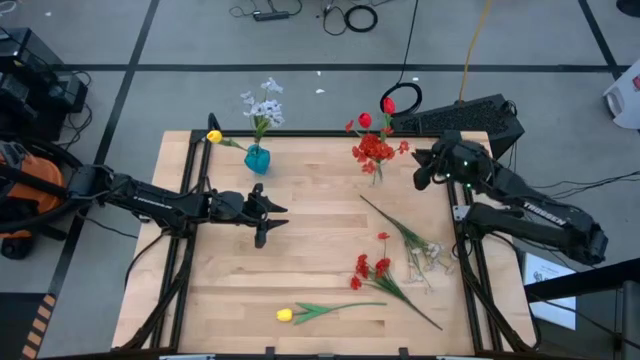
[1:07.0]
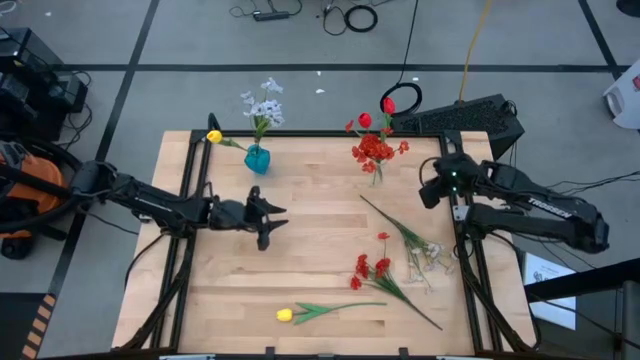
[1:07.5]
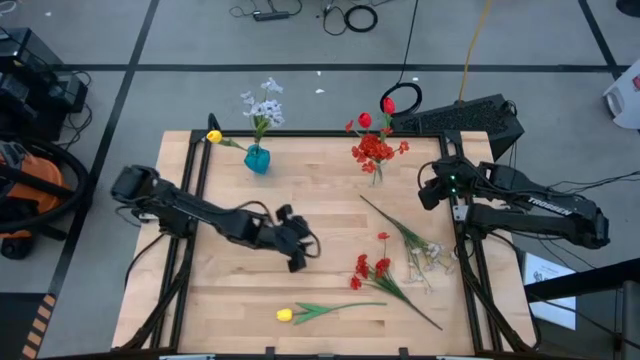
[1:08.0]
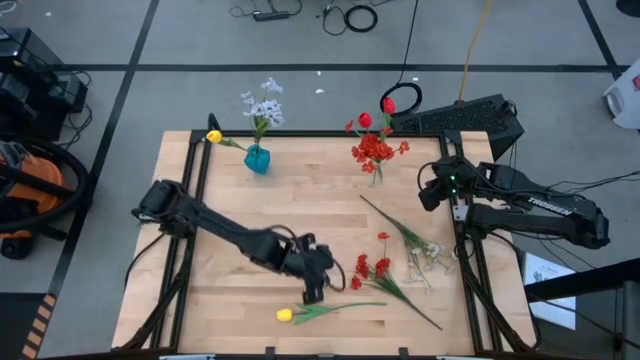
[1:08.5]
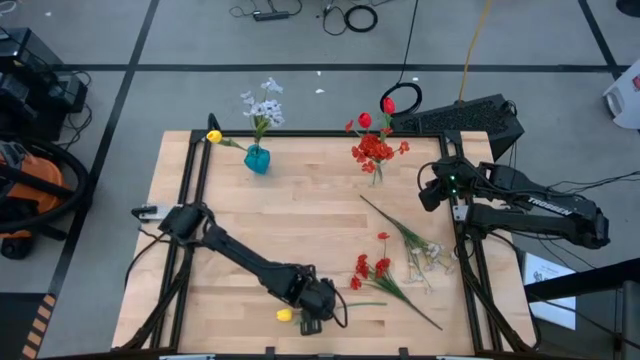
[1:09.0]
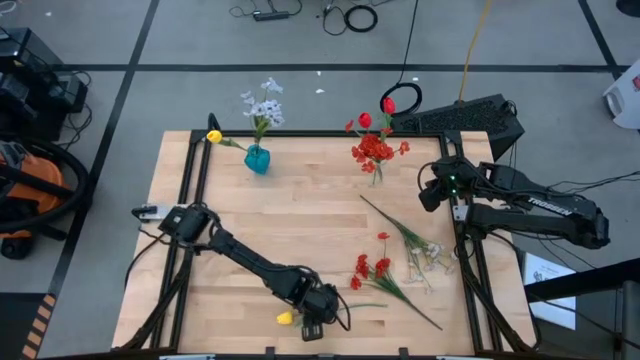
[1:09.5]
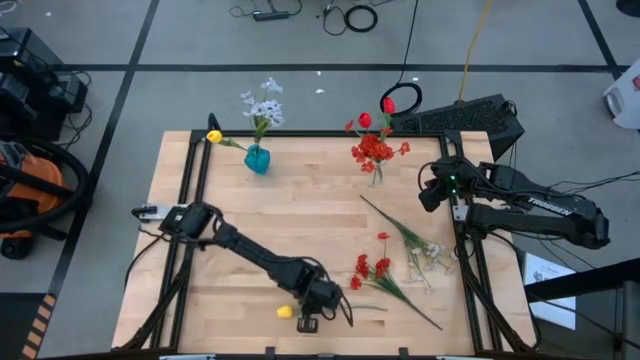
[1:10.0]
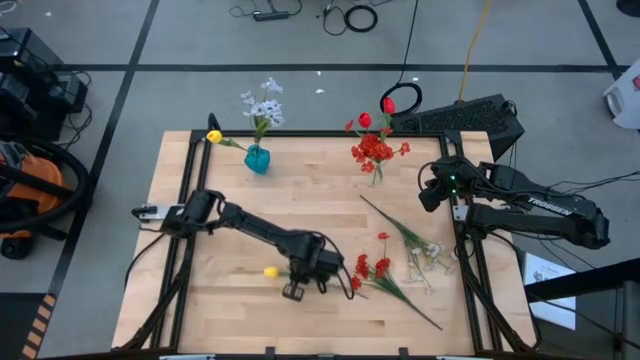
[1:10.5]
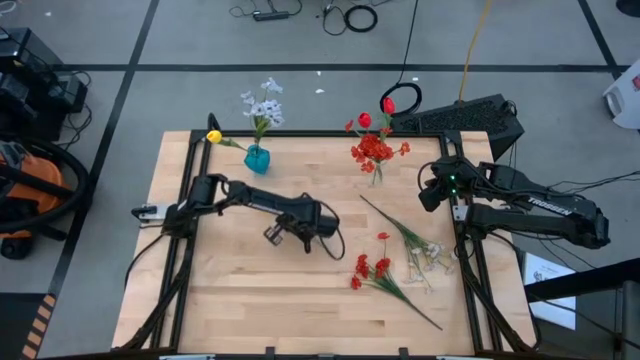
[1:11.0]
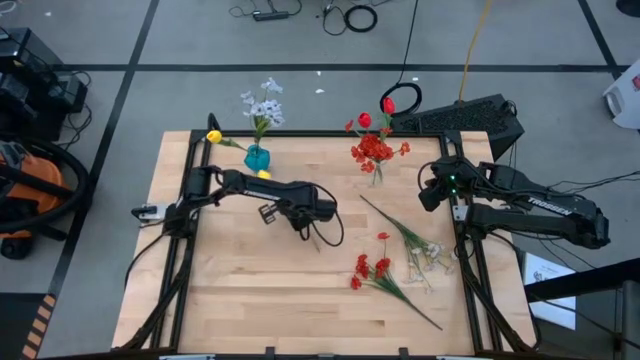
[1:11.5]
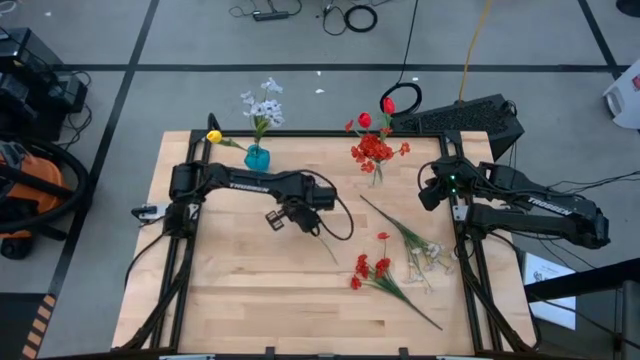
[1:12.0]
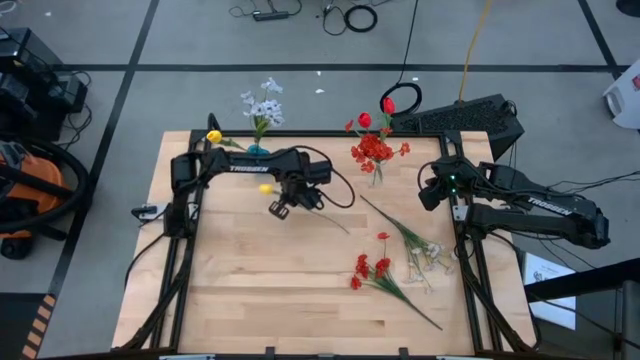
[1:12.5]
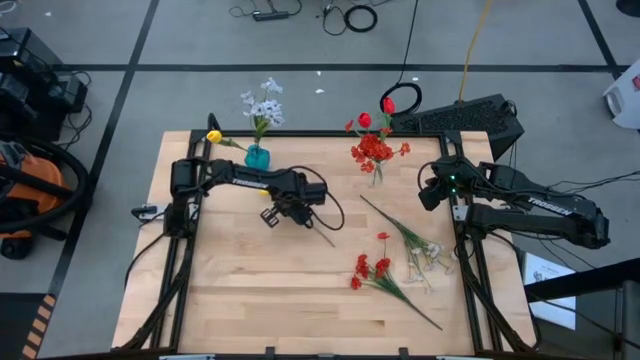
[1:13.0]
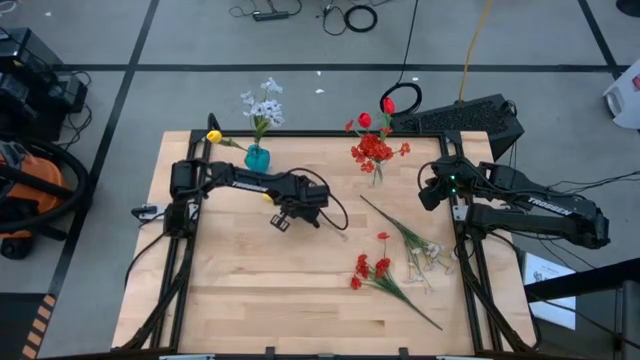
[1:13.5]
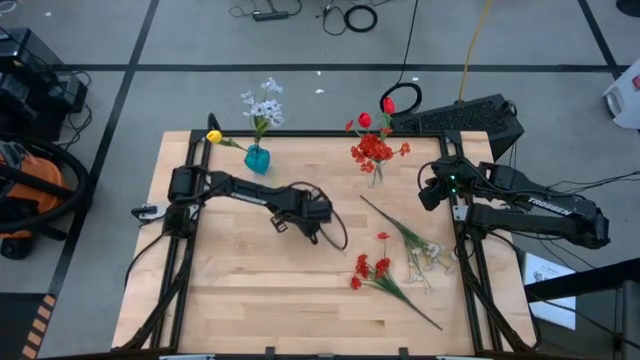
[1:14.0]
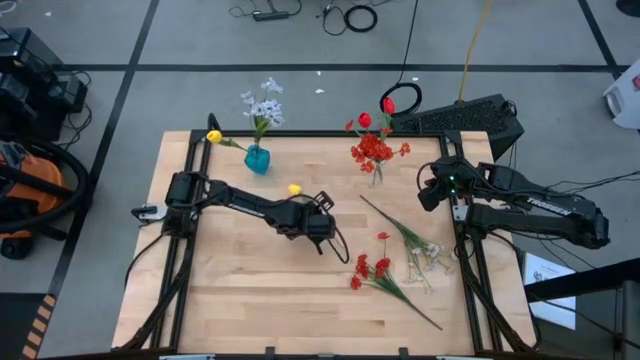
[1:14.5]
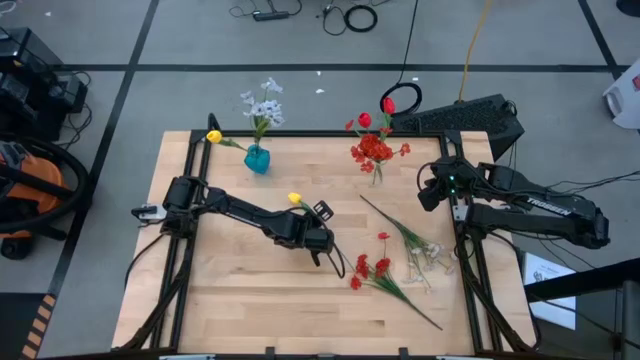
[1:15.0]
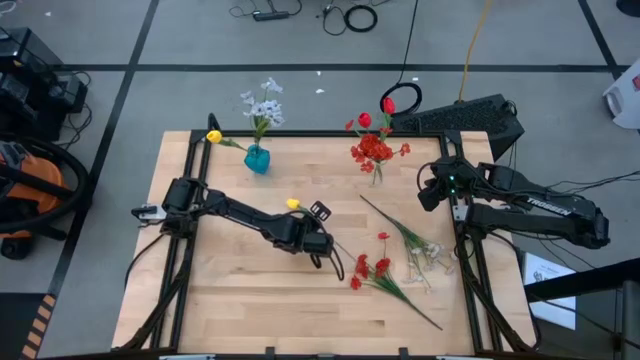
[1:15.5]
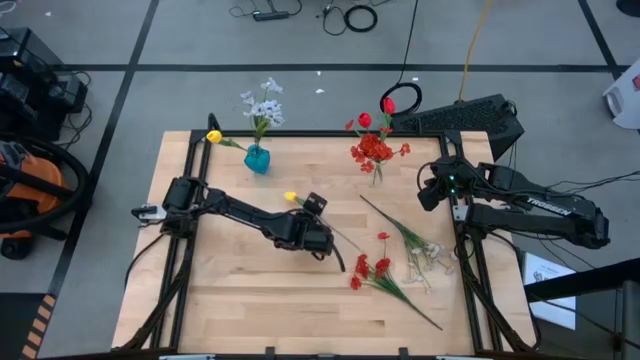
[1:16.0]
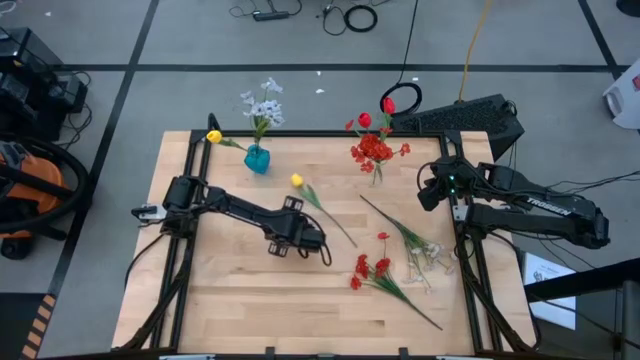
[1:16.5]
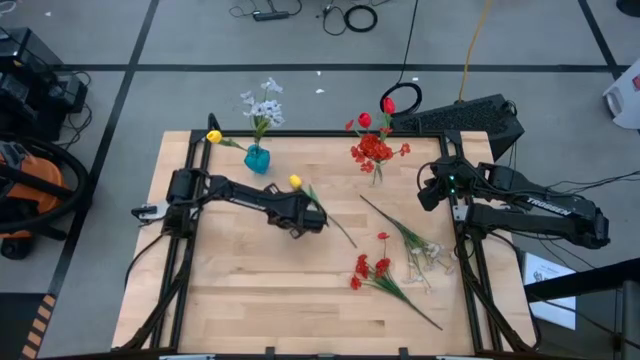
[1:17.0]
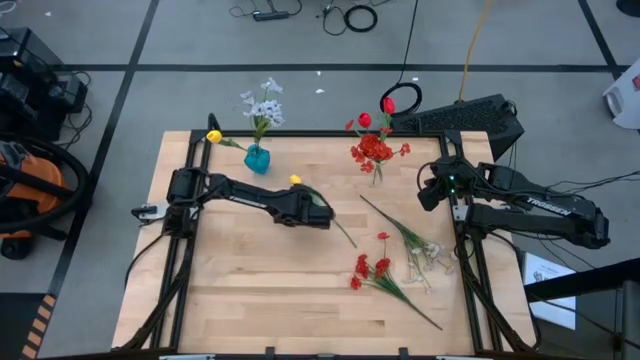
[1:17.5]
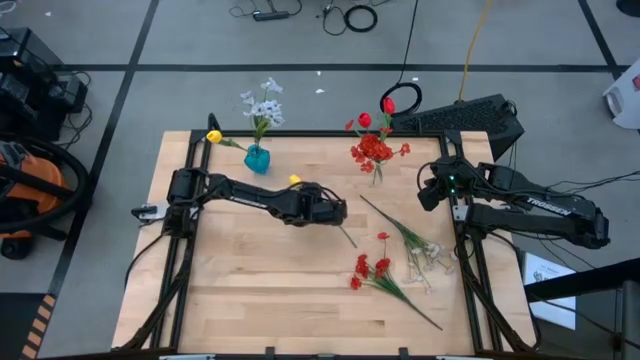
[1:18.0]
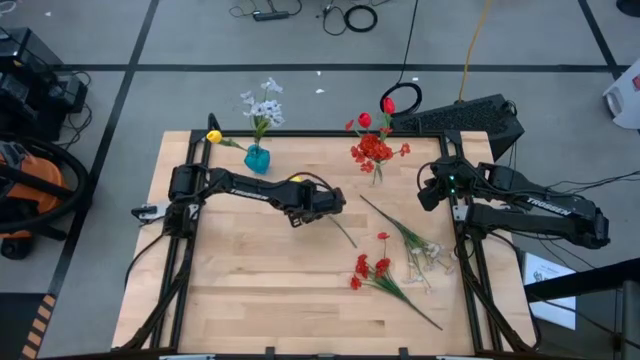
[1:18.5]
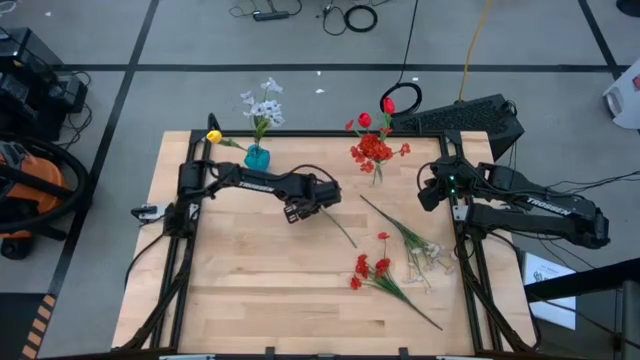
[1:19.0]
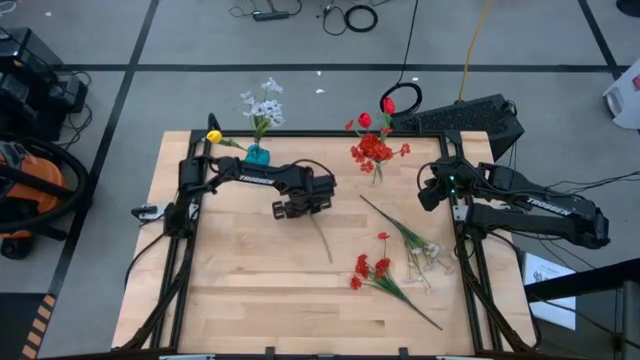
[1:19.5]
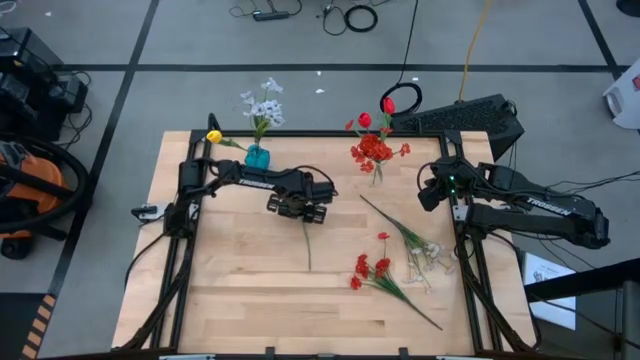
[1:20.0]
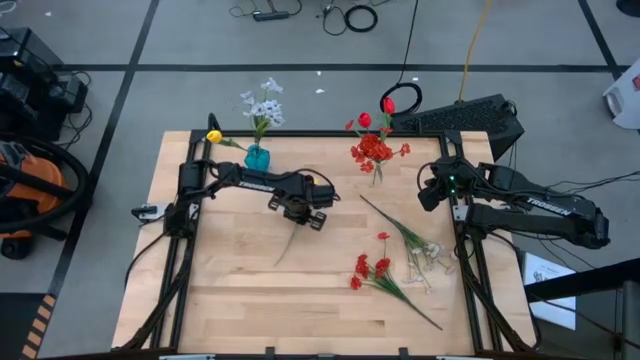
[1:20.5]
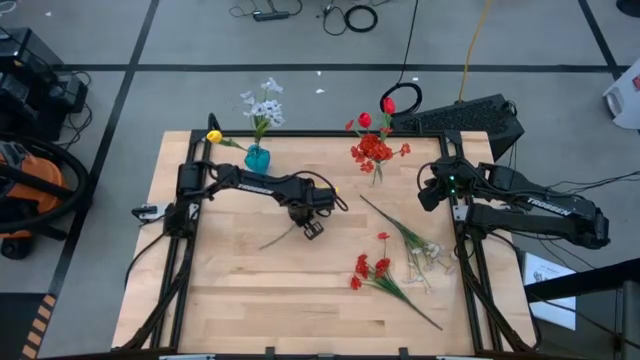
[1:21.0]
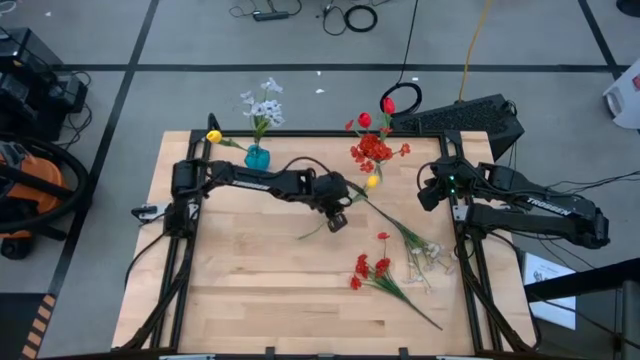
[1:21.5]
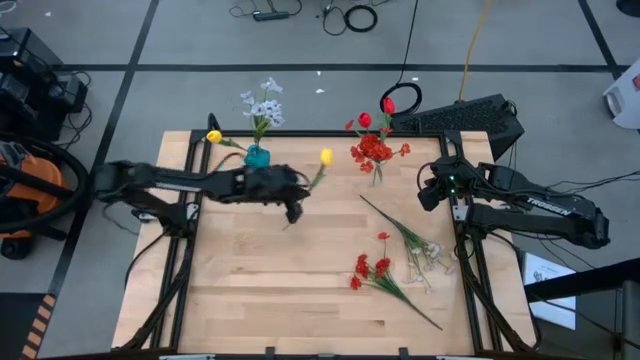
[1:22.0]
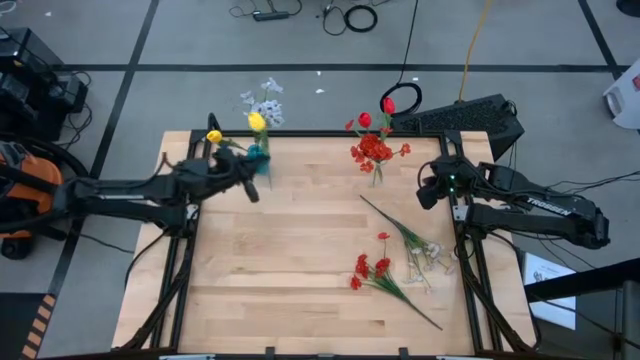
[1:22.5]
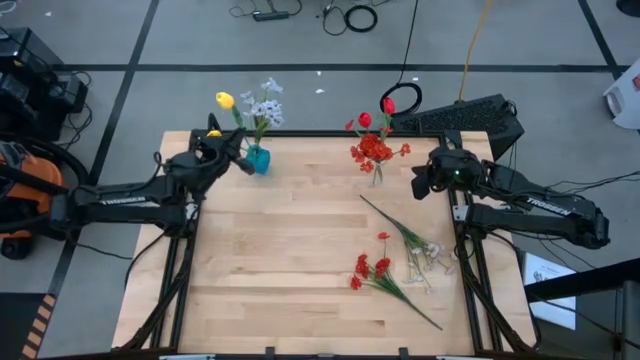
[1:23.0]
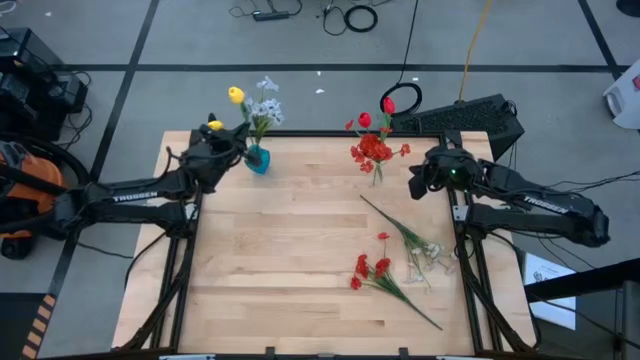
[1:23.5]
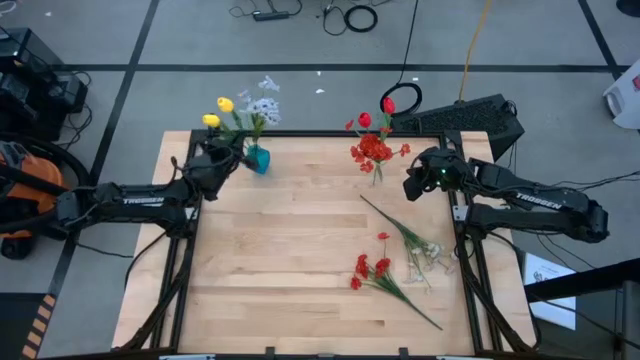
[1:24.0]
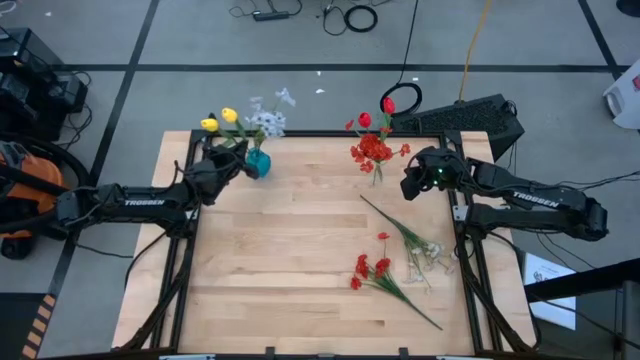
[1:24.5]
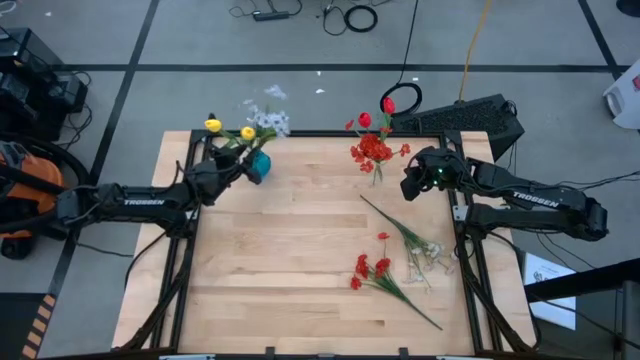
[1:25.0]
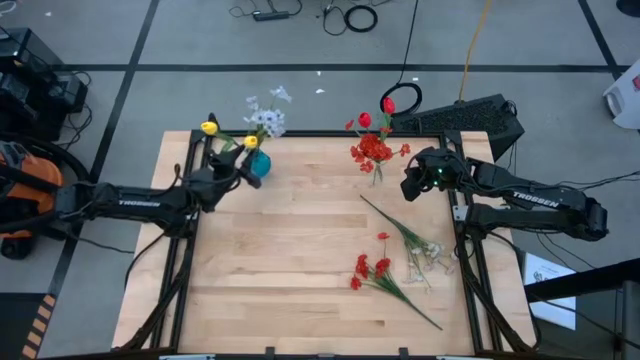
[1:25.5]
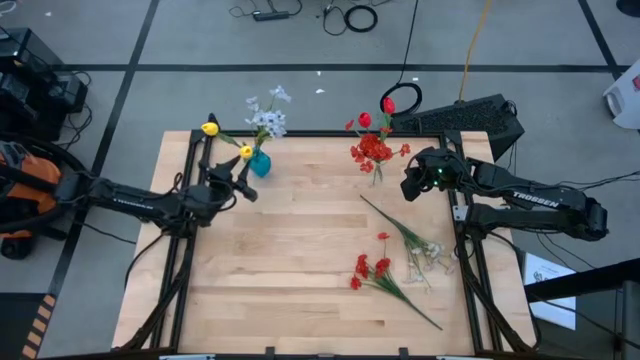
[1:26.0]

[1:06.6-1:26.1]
Task: Sort flowers into vase by color
Put the yellow flower into the blue vase

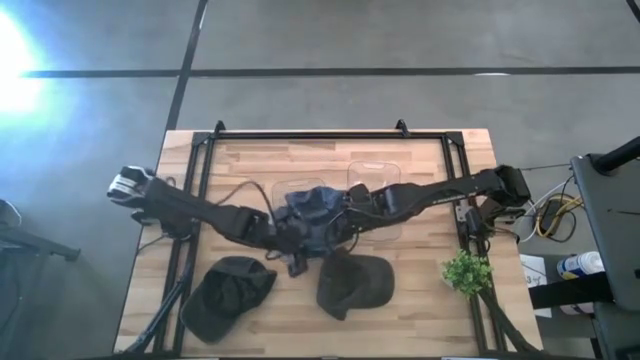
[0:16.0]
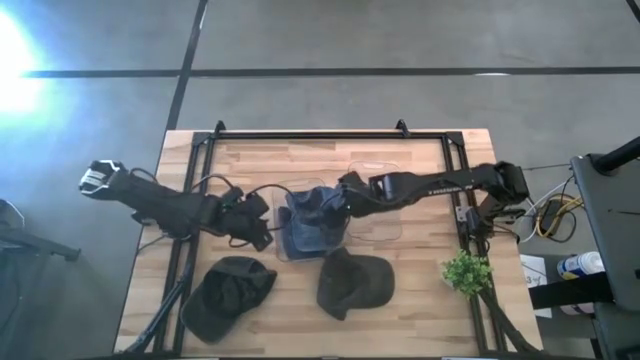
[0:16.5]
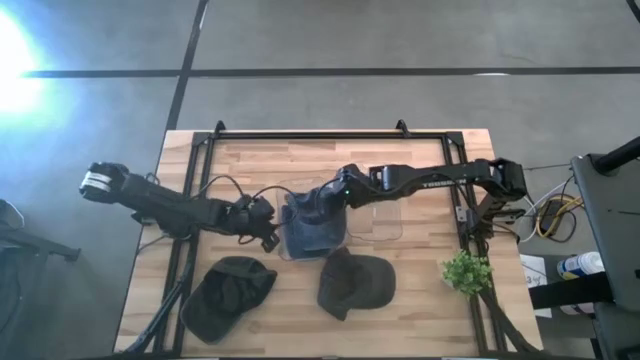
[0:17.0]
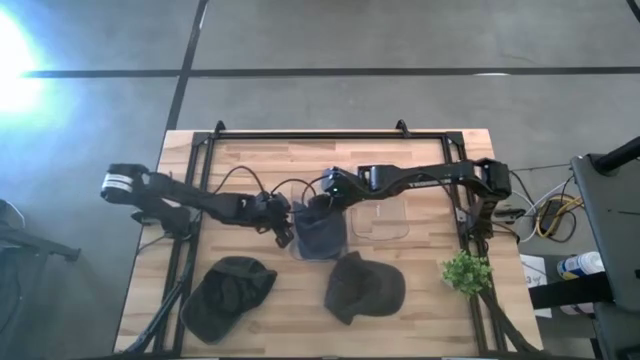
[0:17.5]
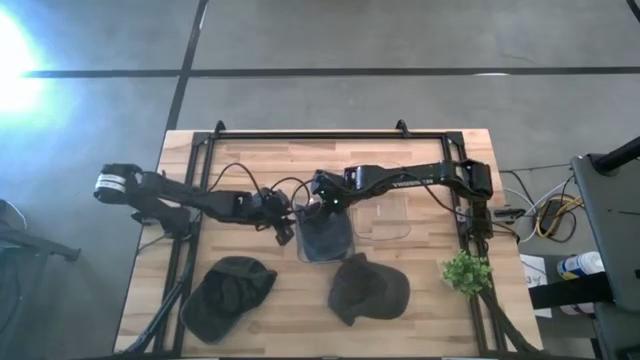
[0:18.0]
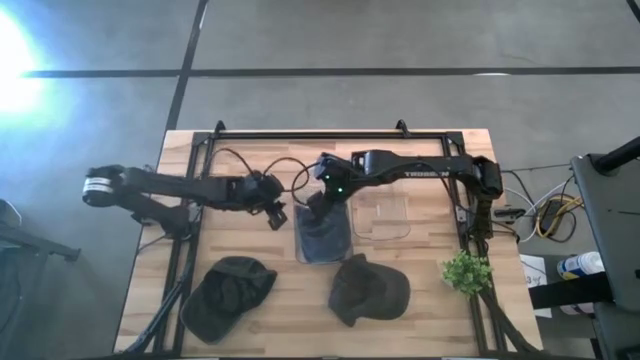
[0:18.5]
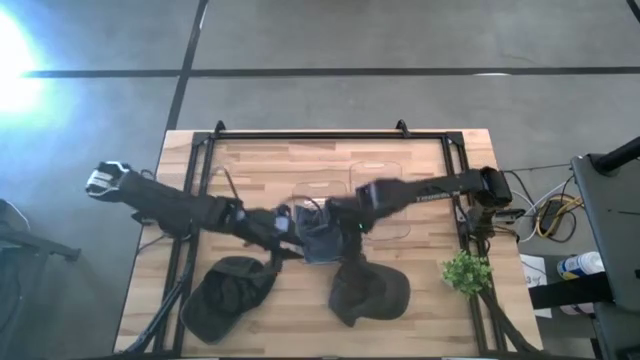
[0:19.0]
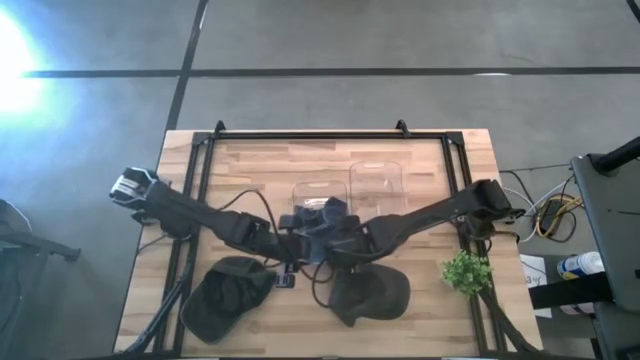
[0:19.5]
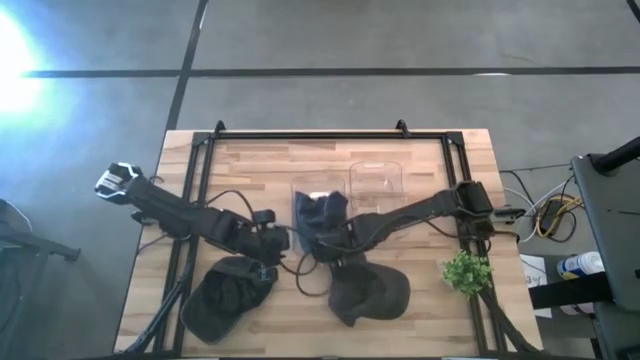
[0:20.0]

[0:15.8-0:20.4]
Task: Pick & Place hat
Adjust the left transparent bin
